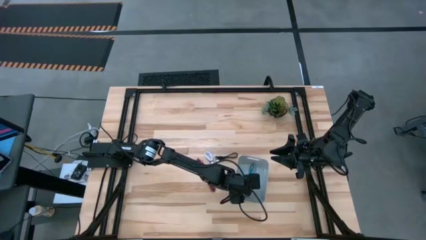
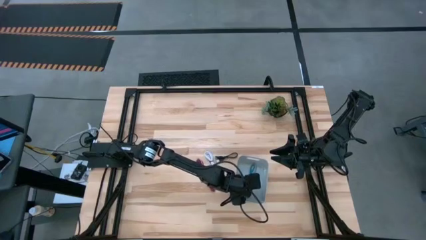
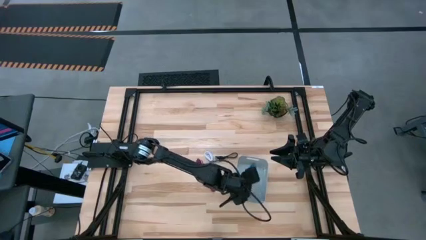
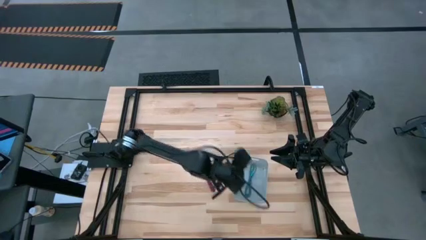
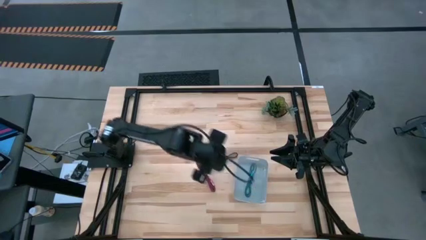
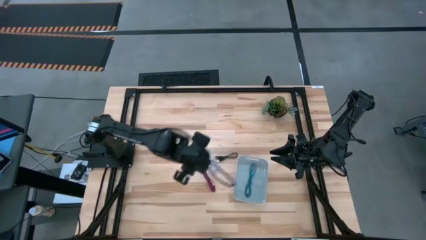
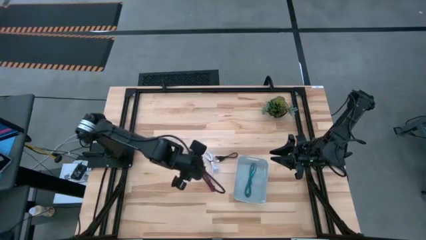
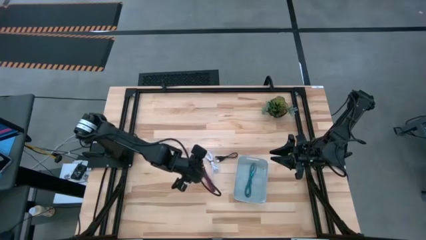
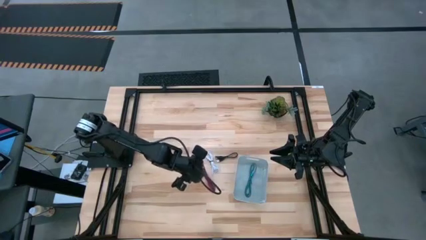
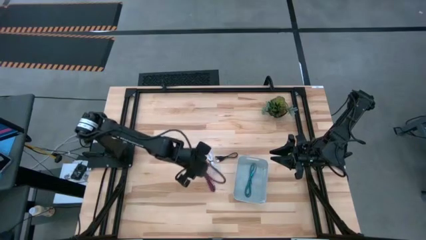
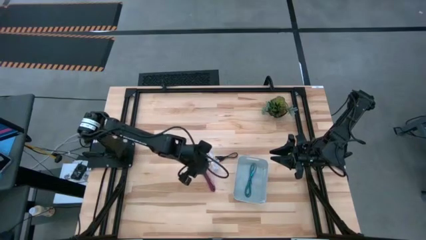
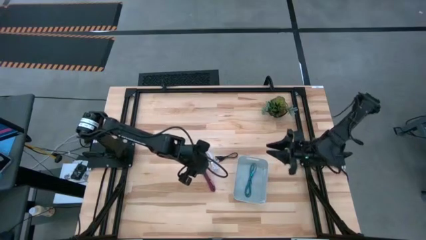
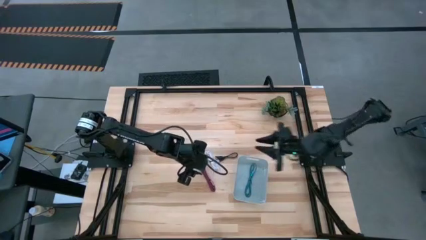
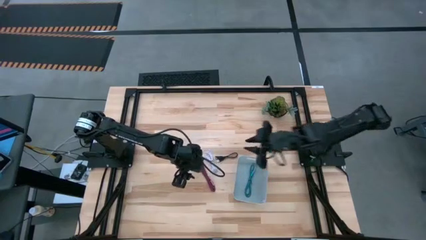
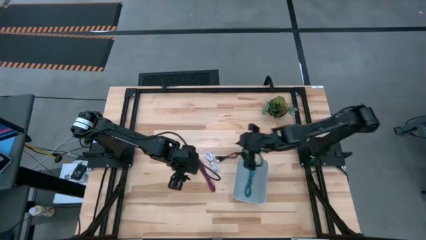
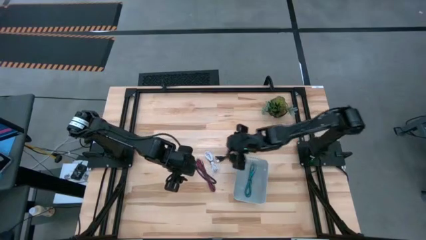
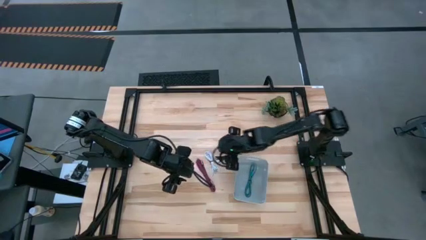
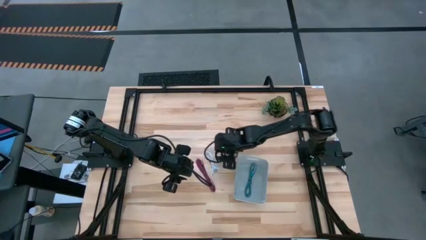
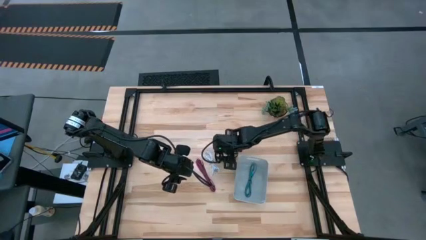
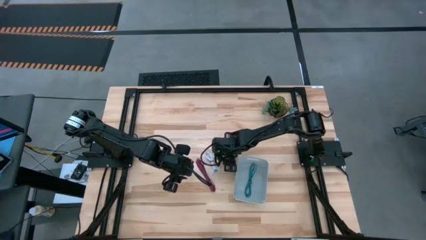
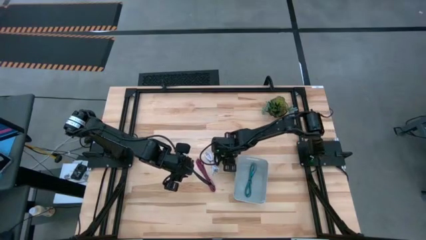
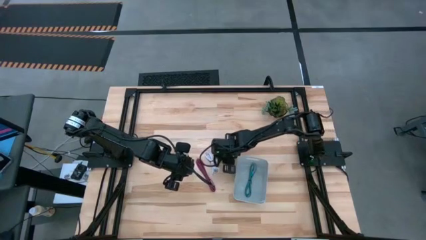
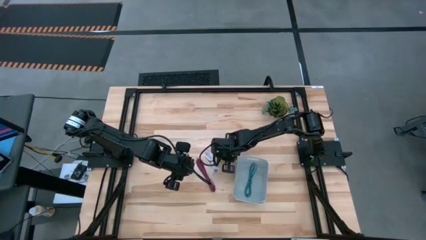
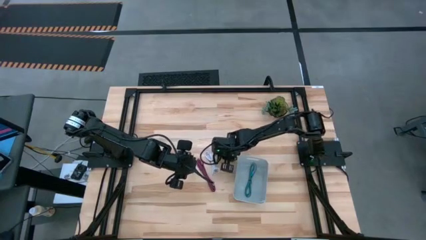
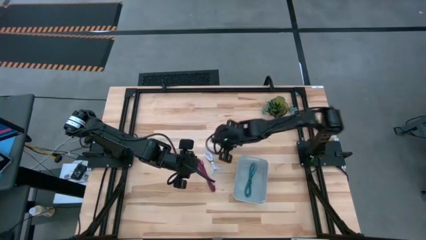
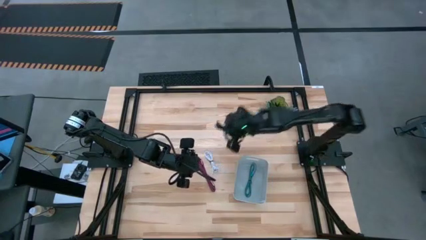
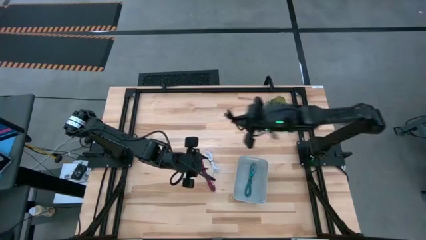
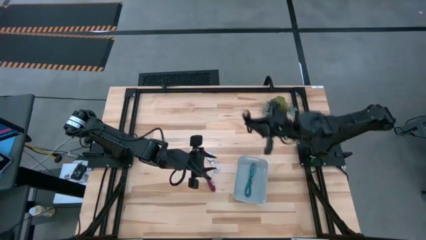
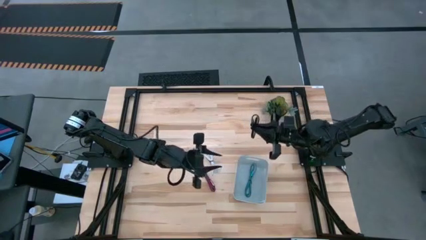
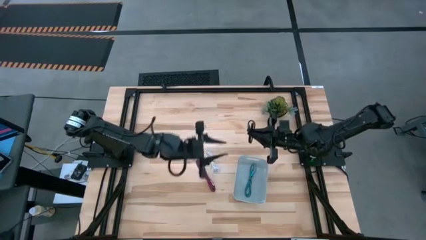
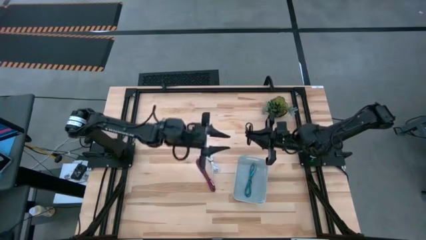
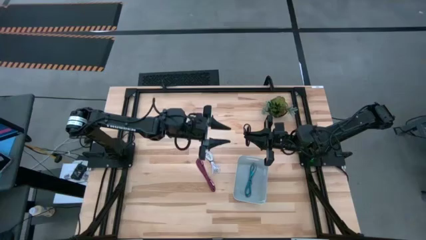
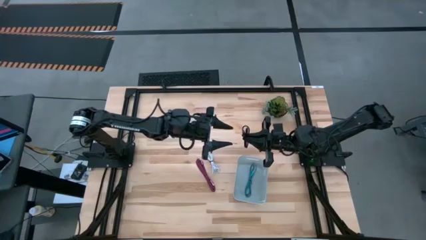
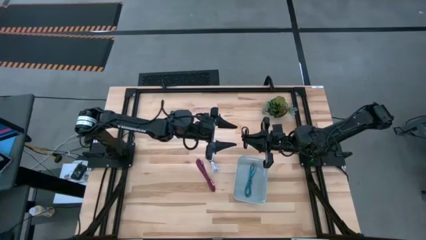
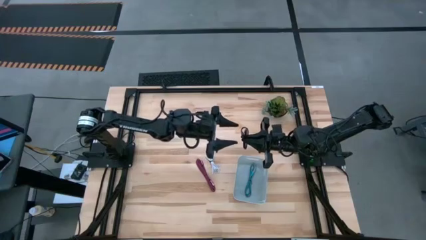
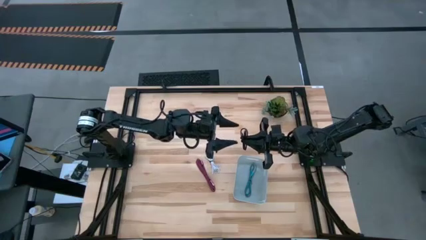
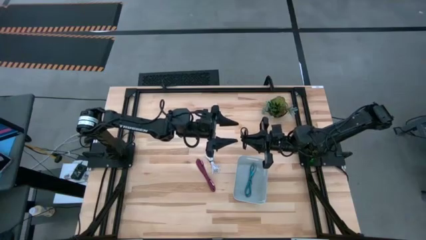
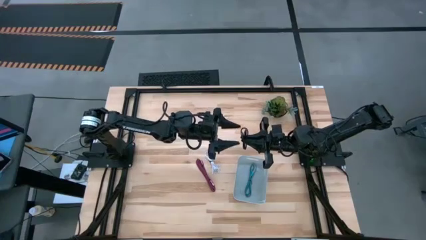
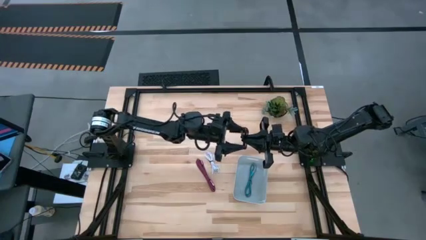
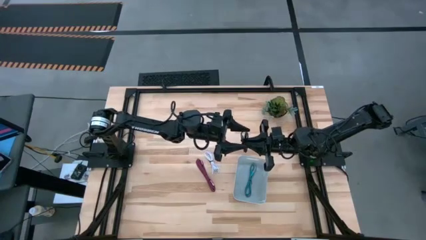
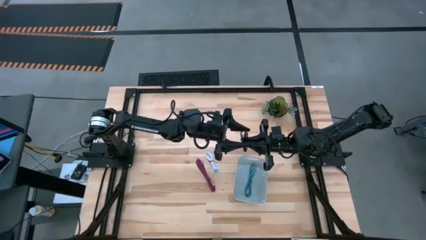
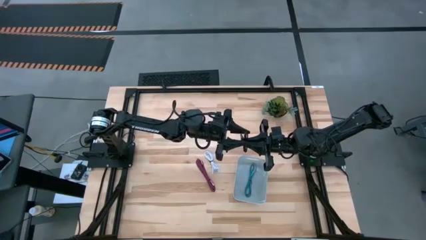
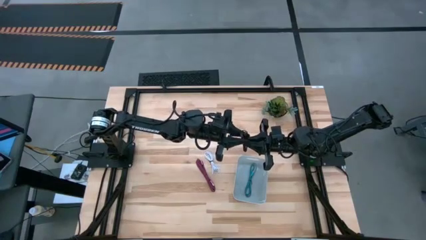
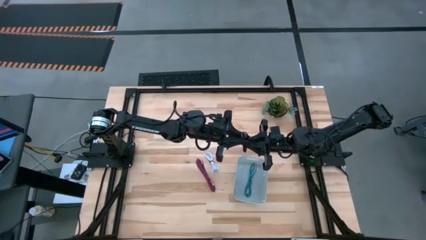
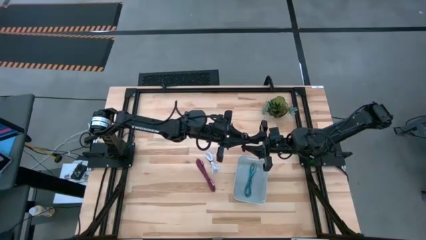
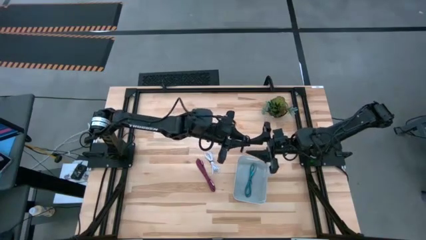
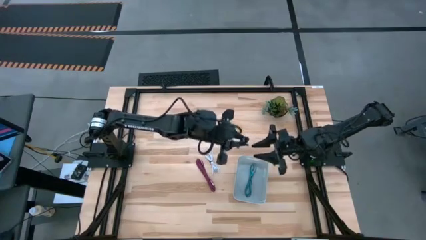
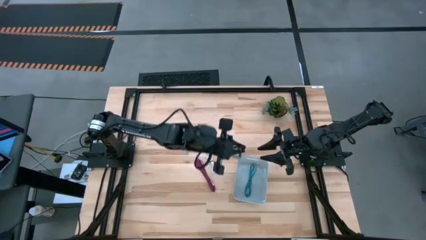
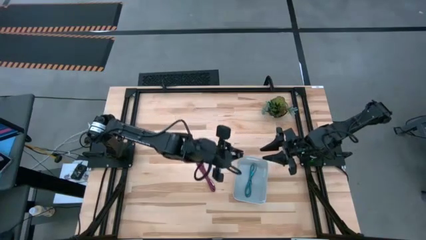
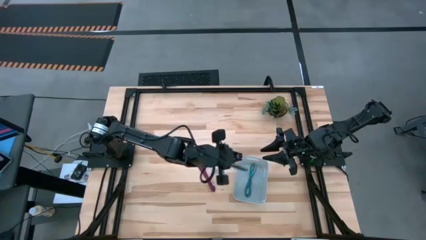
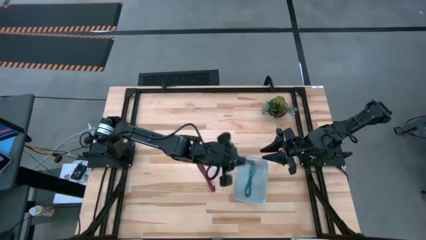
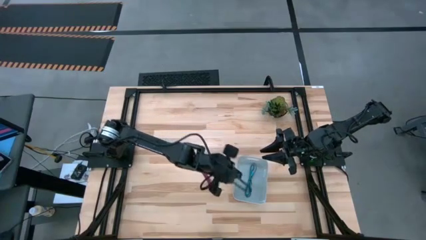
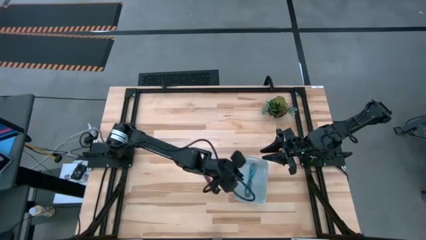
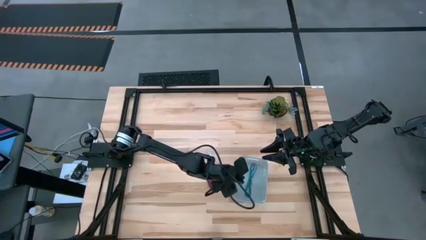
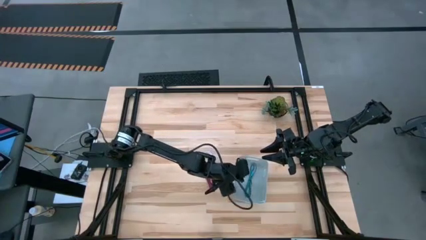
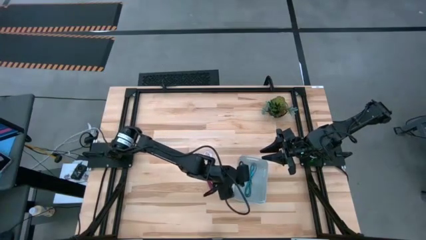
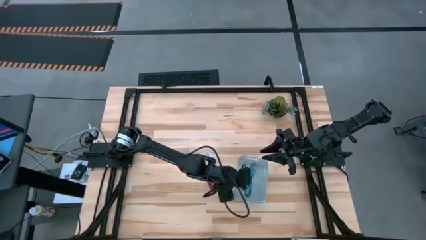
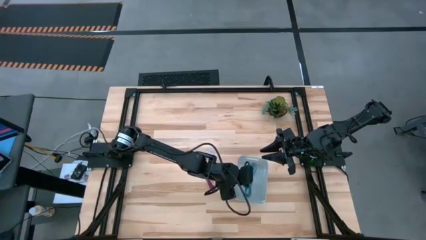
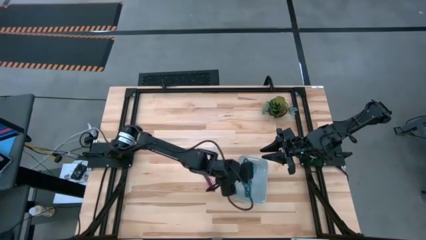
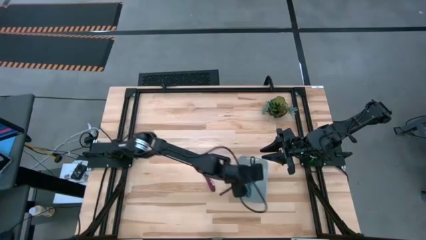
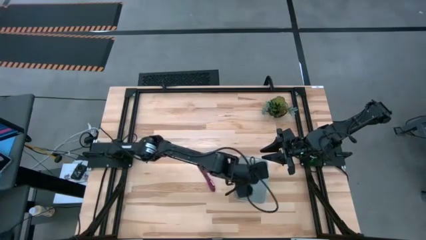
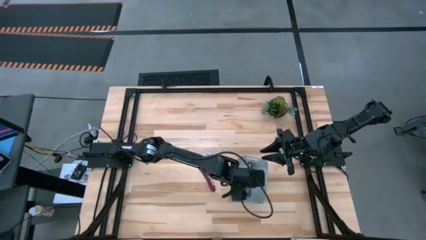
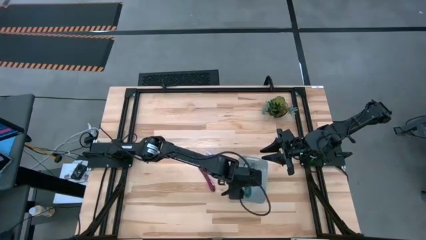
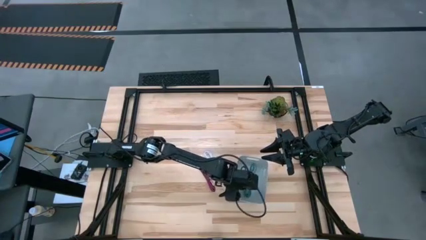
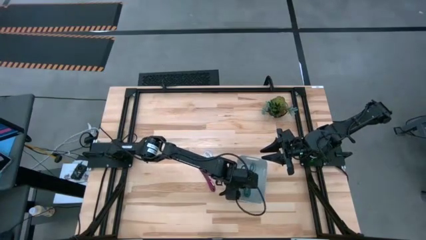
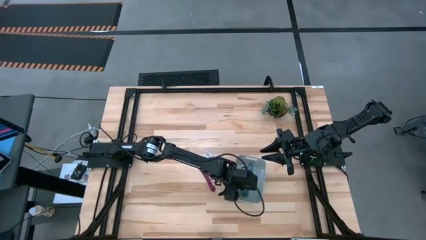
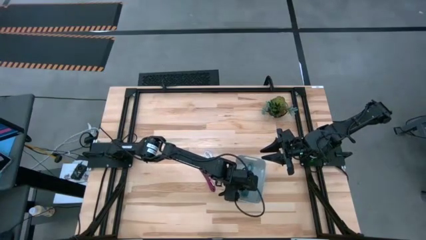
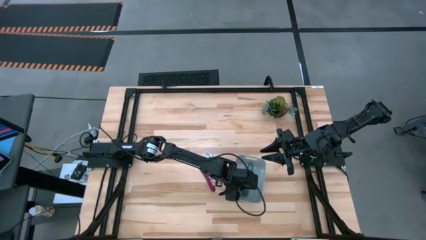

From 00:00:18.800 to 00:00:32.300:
Task: Pick and place USB-C Cables
Put the black charger cable into the gray bin
